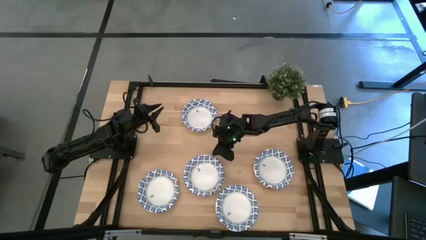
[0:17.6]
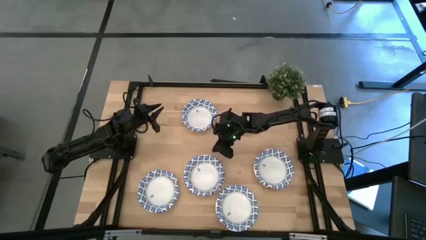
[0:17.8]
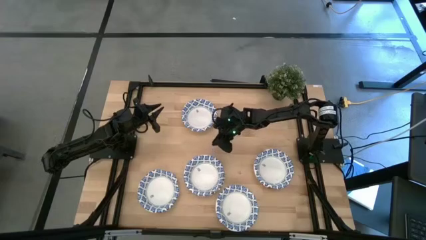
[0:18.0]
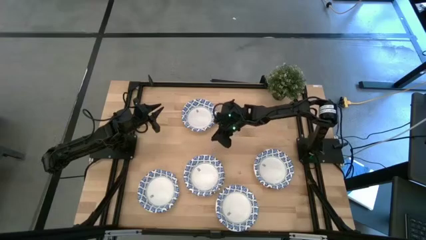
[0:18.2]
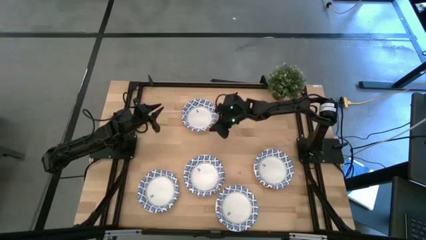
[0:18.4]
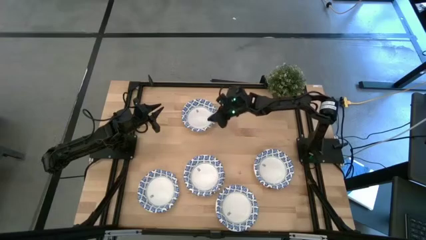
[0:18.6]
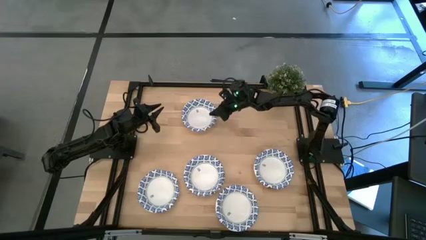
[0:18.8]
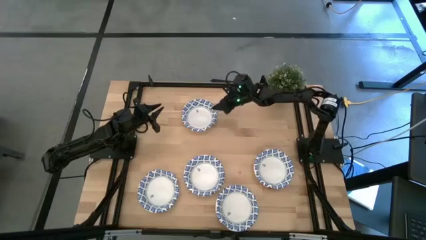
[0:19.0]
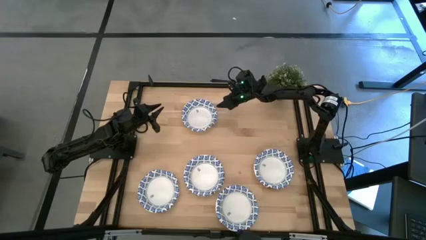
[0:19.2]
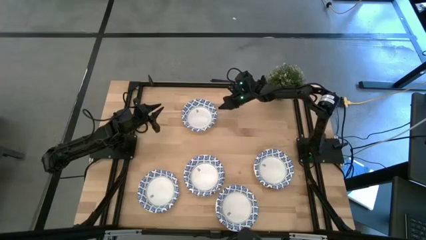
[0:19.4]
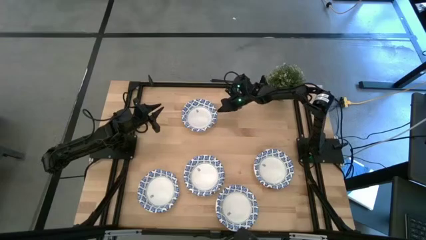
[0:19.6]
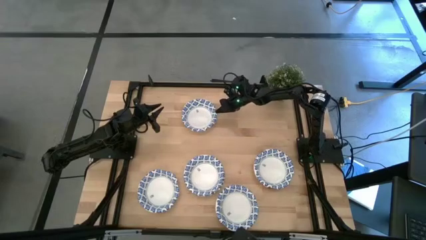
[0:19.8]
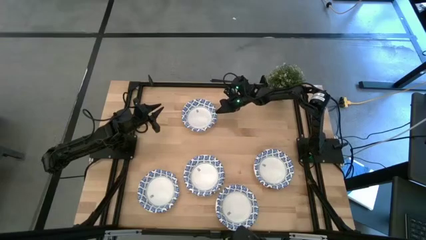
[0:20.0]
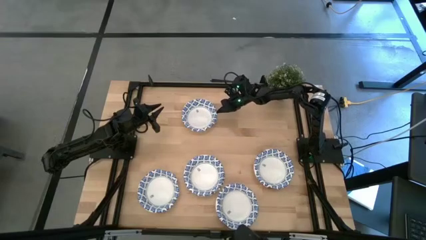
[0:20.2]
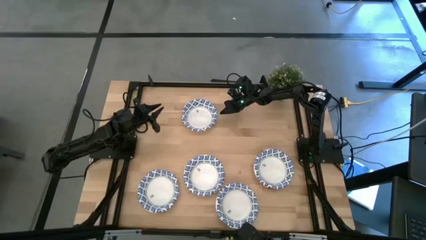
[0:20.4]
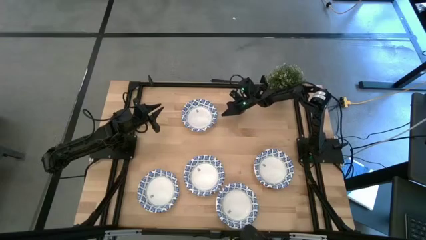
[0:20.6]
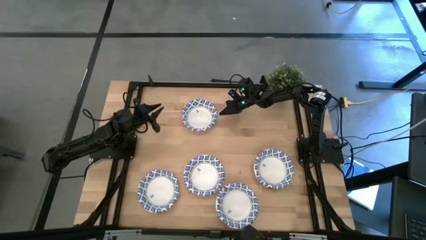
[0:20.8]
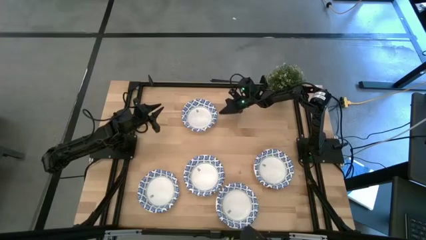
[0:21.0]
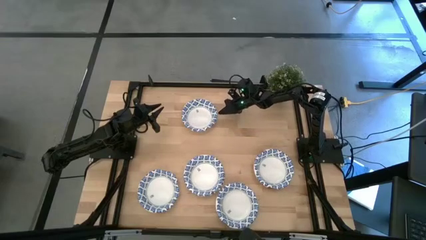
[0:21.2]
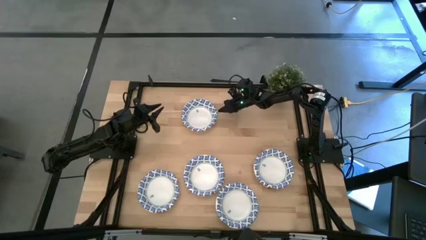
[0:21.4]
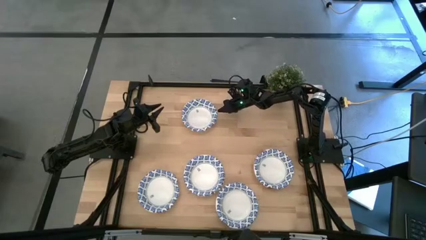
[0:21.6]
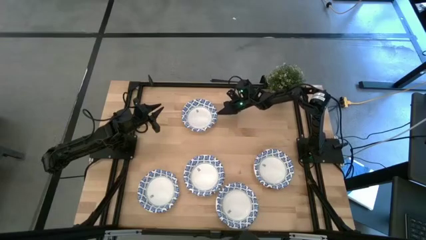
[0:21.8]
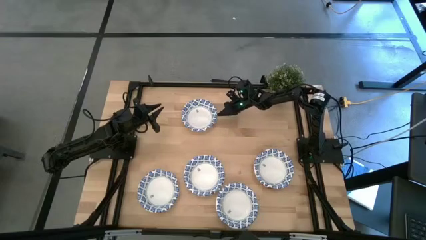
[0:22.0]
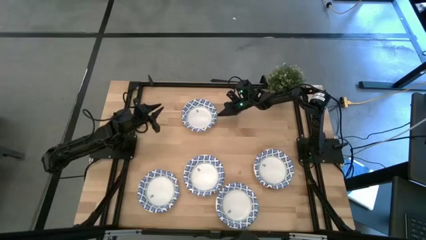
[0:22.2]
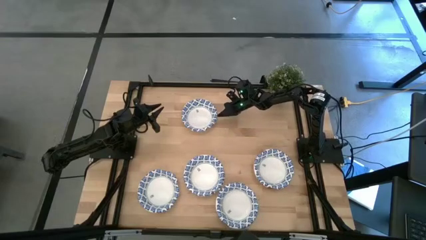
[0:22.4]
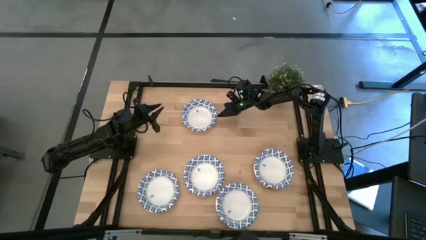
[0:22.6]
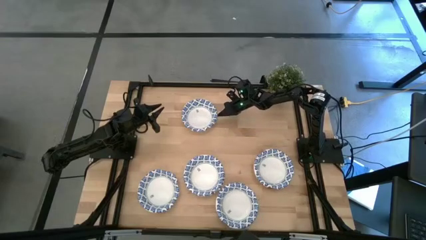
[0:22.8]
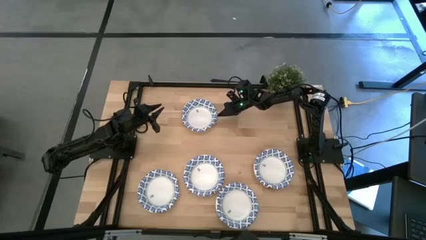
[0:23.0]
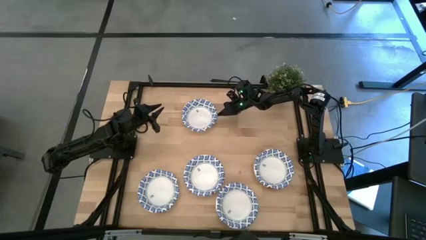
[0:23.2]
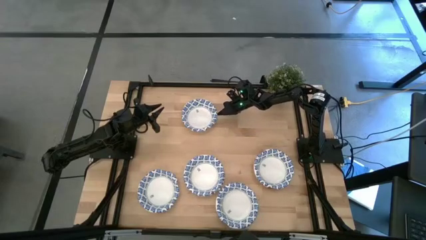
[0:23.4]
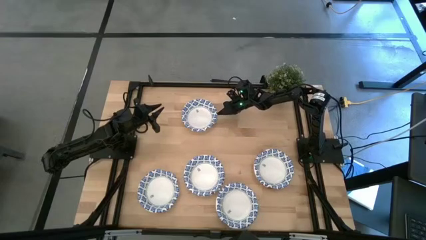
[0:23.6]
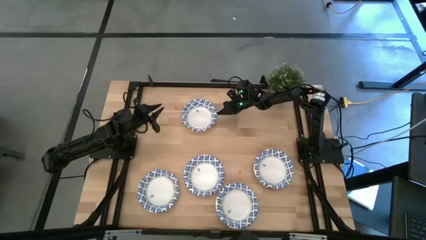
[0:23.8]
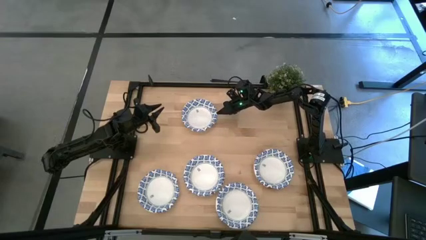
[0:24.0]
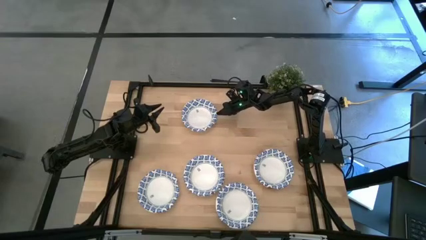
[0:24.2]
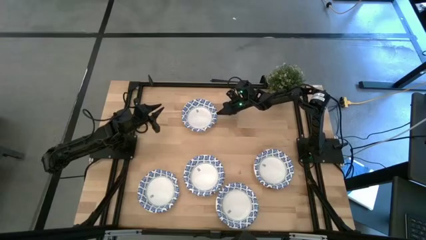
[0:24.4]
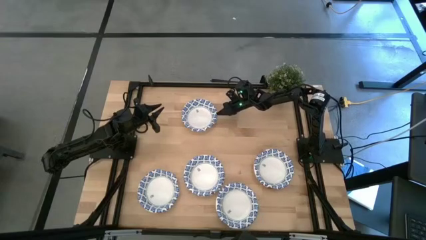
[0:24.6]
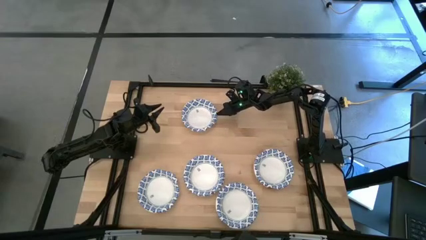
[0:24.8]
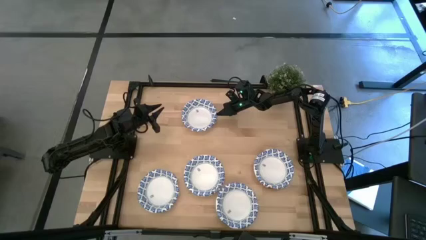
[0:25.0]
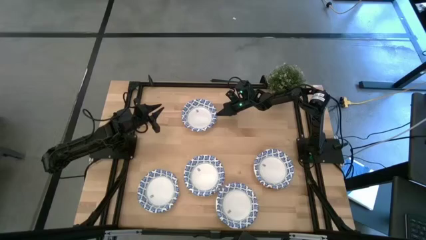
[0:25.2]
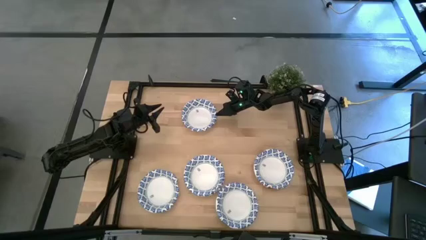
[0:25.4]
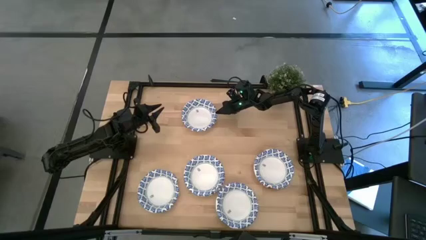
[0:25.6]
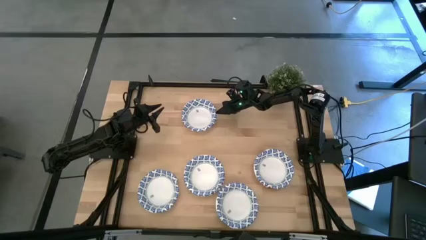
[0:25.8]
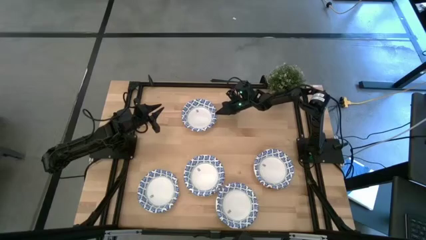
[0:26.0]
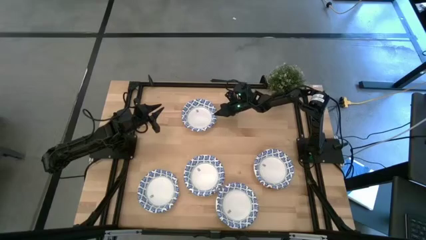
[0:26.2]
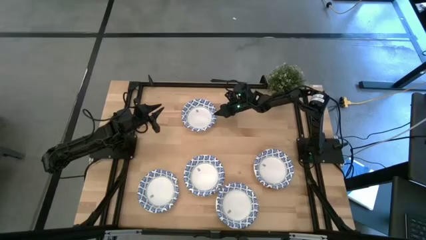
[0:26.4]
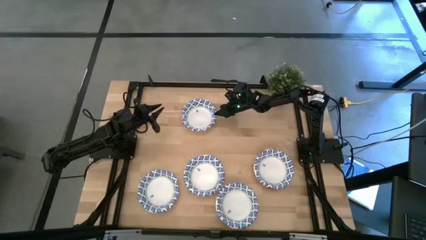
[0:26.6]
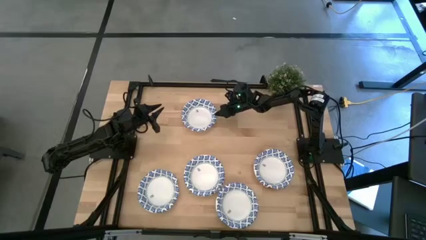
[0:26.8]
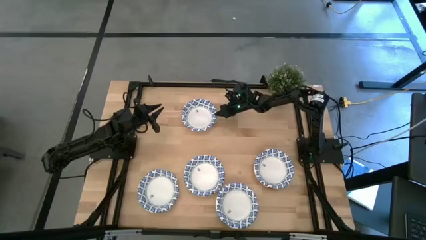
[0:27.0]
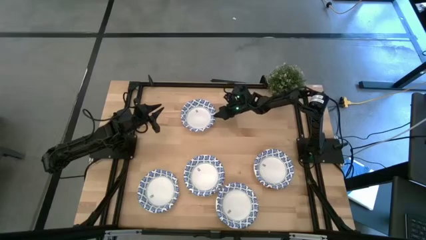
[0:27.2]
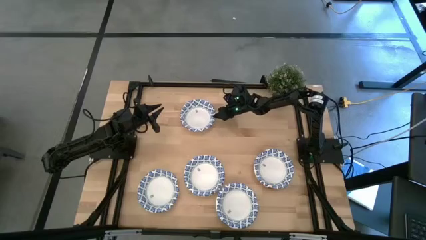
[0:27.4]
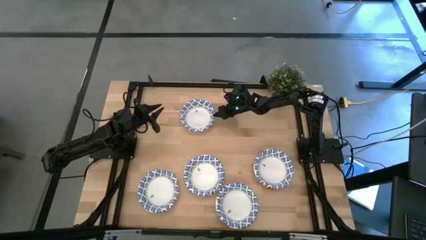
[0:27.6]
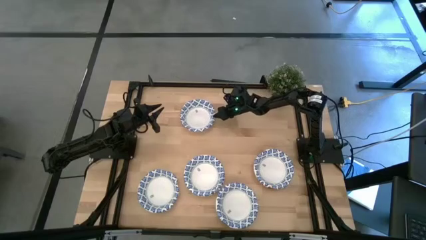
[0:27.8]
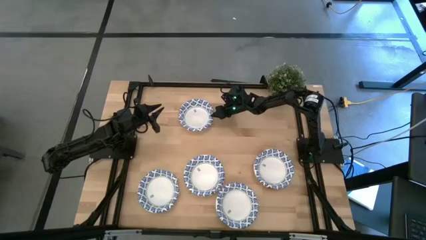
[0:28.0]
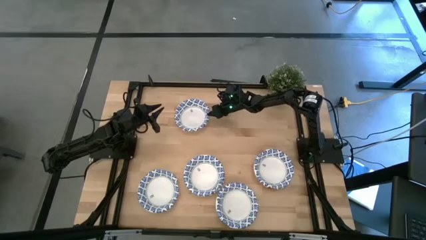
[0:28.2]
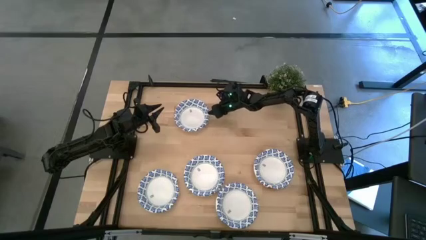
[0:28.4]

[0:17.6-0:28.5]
Task: Nest bowls inside each other
Stack the bowl on top of the other blue bowls

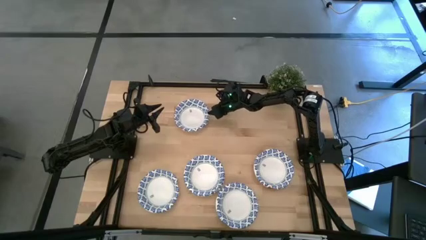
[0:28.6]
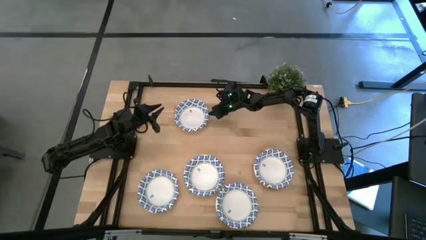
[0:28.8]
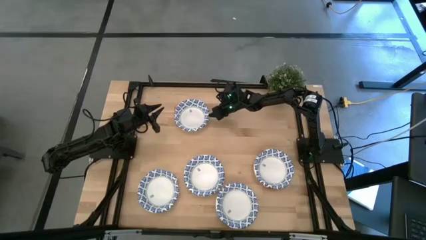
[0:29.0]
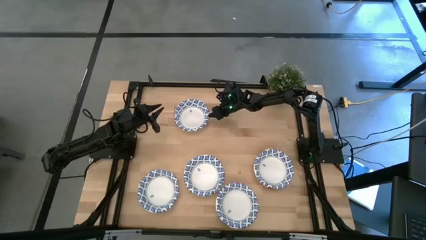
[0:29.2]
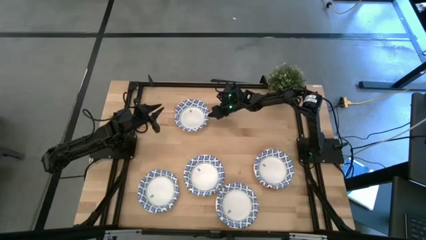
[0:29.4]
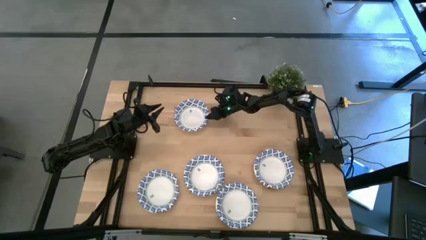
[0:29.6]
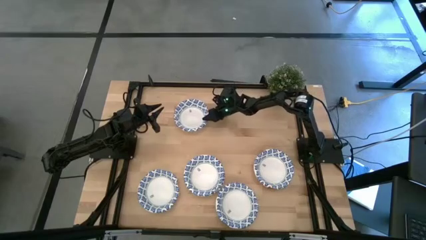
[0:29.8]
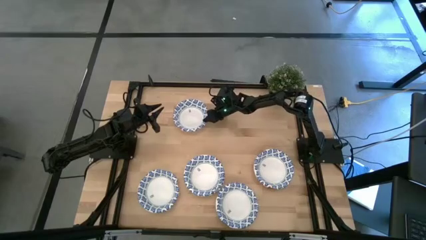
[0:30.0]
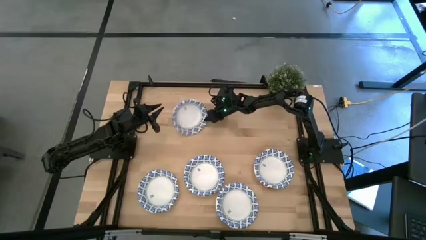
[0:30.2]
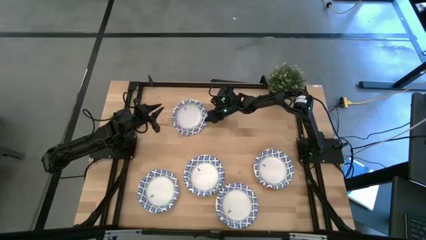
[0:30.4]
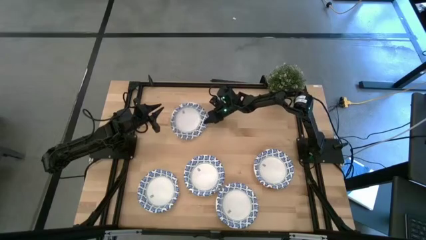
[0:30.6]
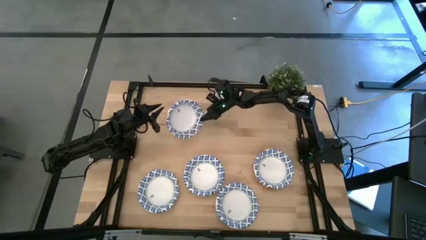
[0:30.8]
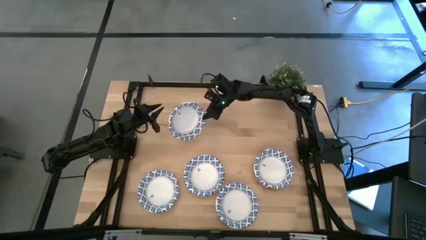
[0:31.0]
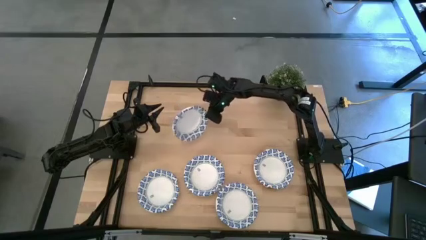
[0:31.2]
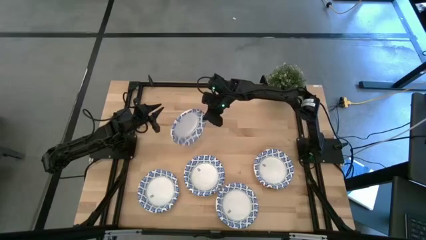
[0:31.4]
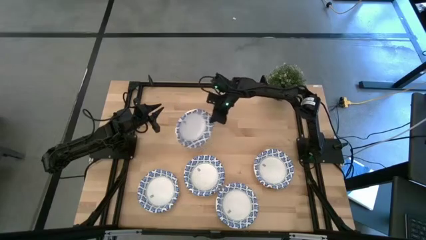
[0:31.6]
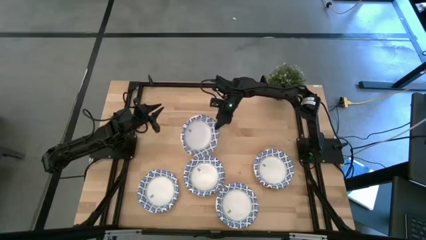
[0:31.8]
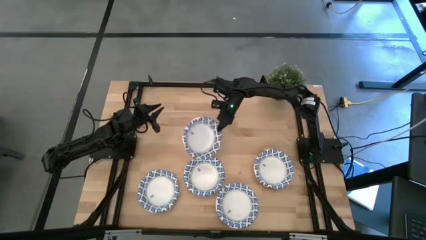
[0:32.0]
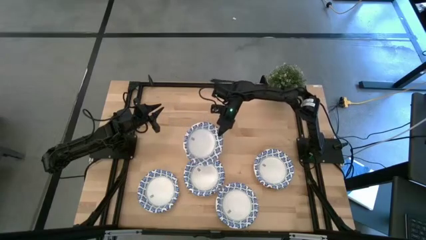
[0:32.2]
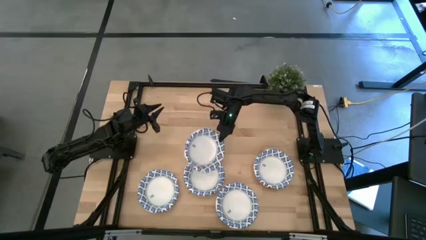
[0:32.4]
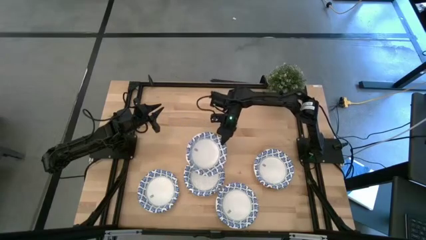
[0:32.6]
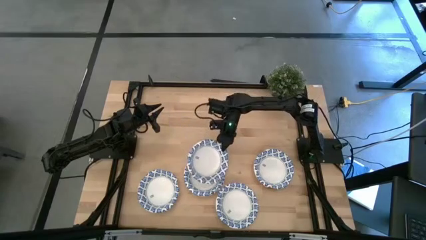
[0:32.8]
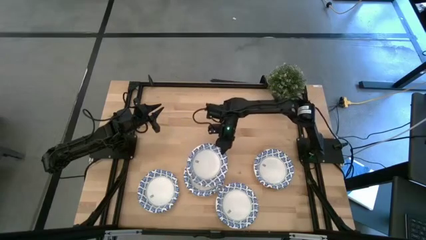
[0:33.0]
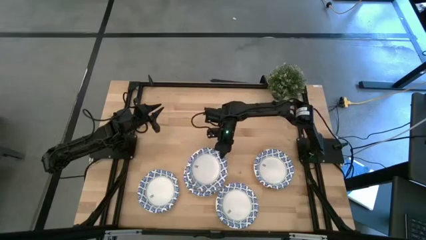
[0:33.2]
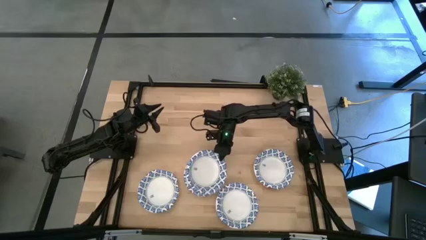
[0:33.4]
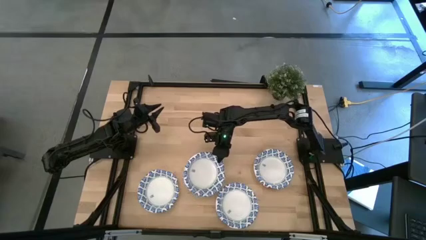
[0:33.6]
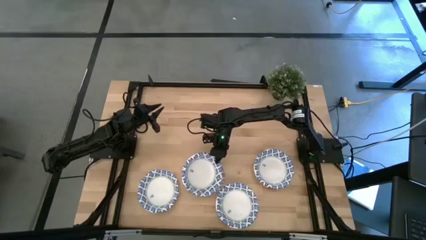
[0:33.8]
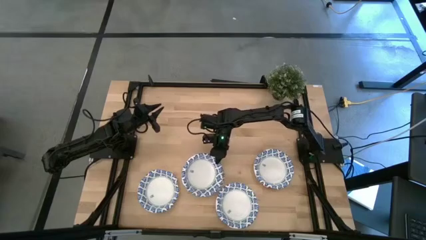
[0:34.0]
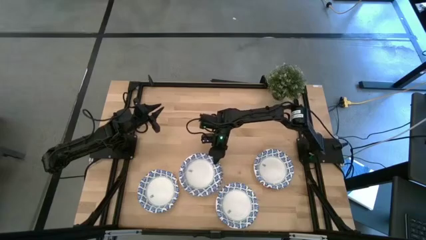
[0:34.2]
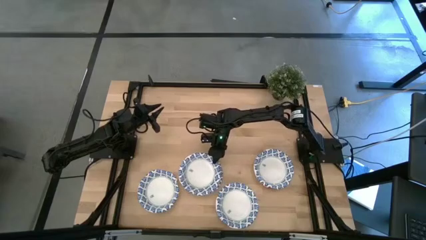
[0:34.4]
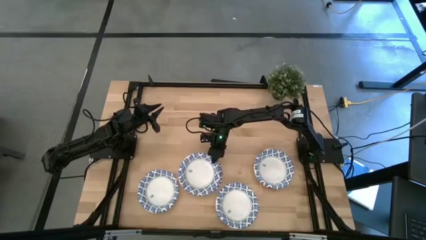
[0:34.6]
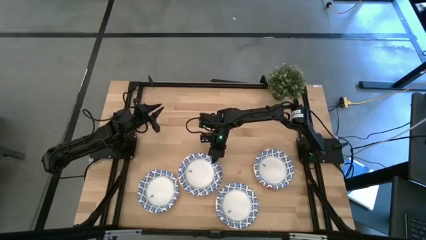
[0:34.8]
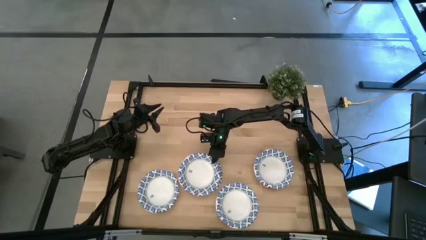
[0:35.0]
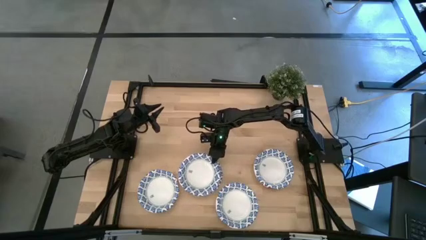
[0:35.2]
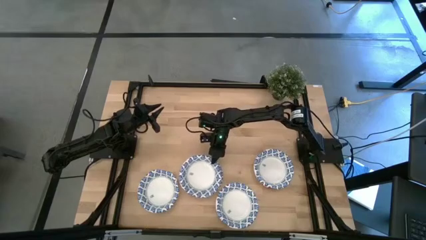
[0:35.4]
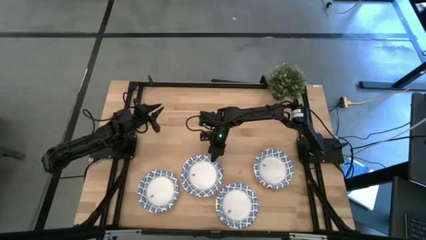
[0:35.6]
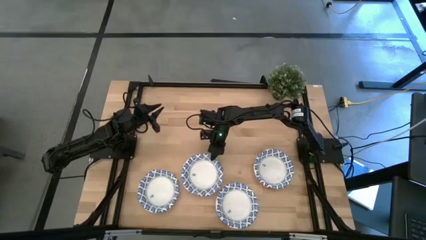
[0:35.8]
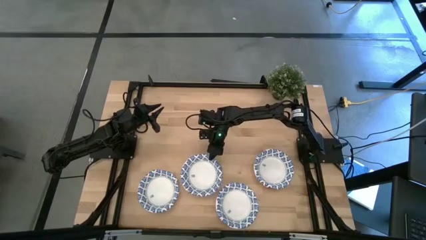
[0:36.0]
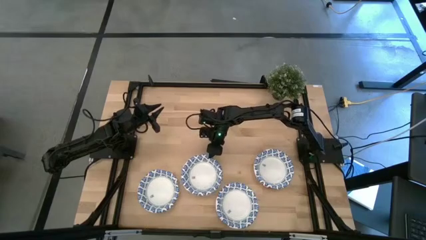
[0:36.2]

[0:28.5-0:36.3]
Stack the bowl on top of the other blue bowls
